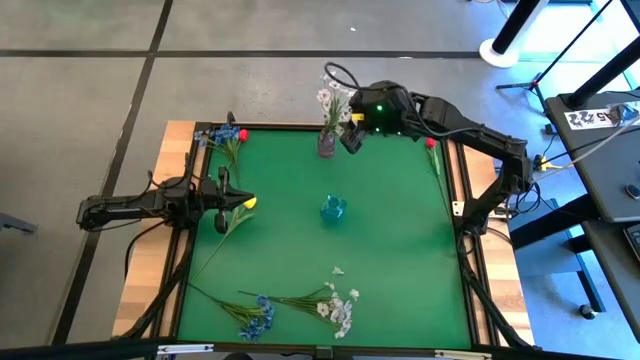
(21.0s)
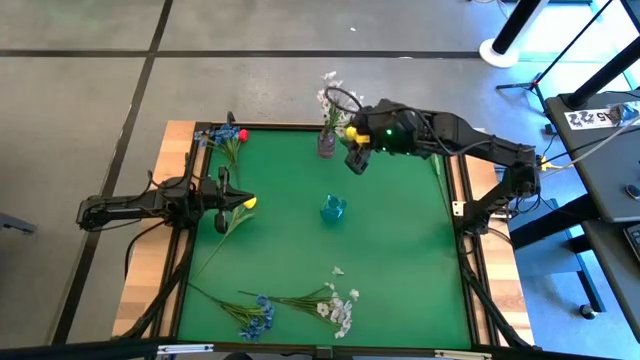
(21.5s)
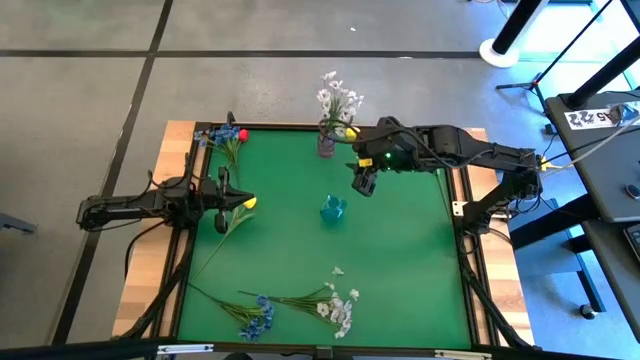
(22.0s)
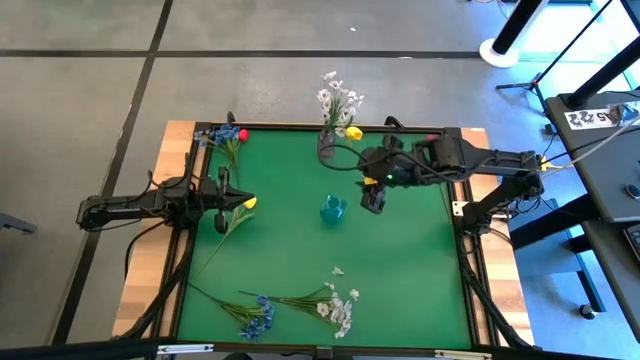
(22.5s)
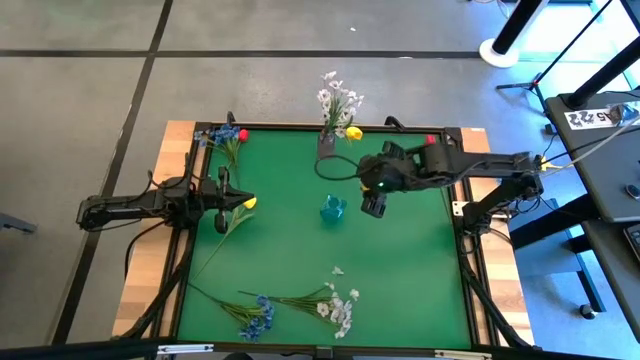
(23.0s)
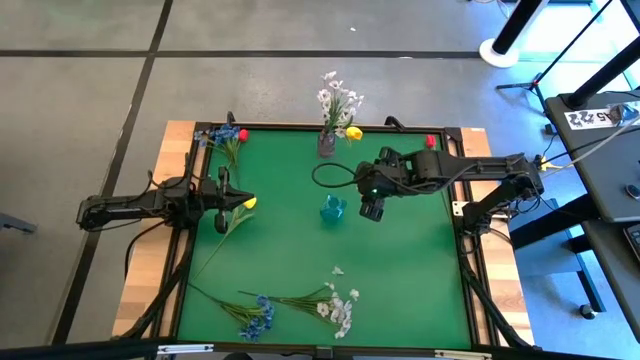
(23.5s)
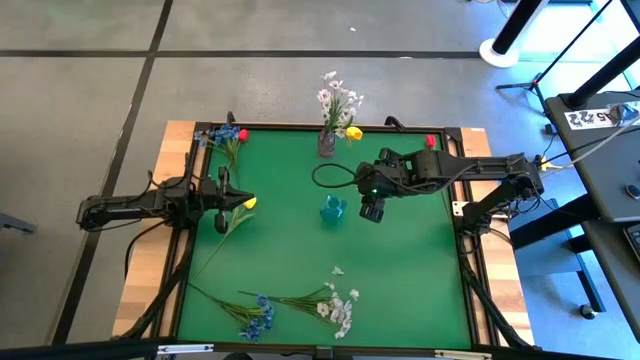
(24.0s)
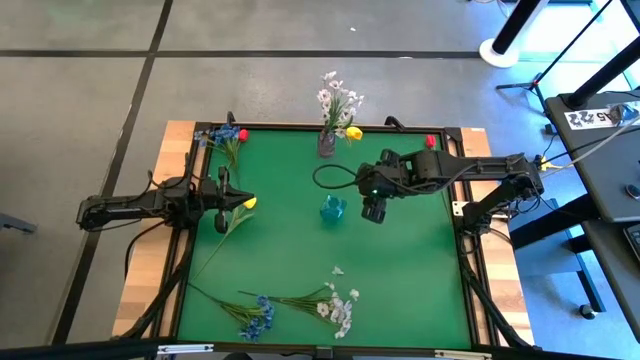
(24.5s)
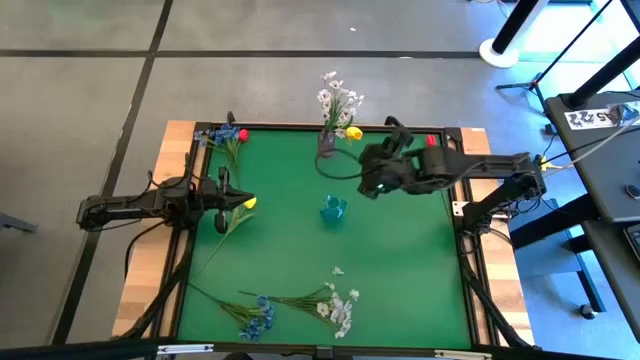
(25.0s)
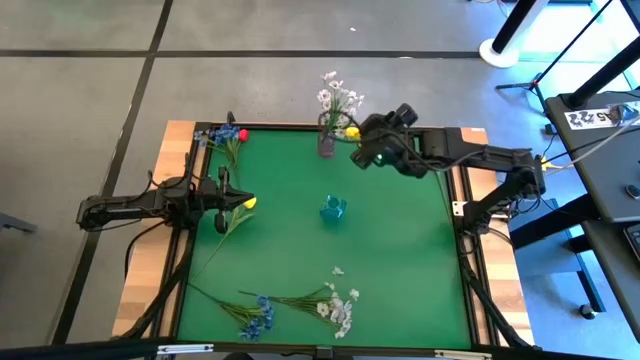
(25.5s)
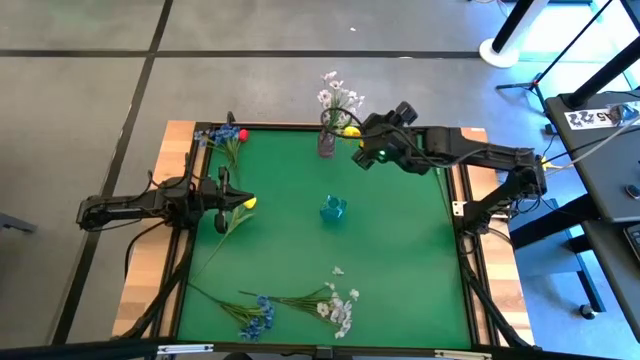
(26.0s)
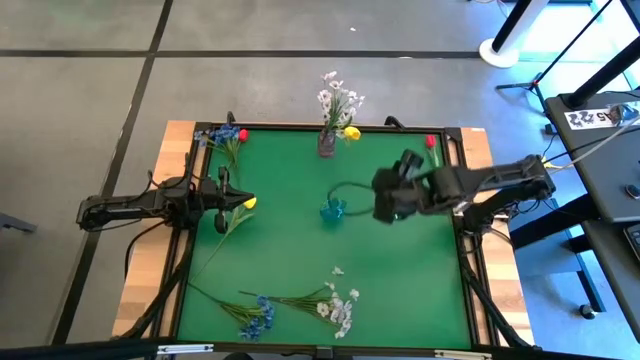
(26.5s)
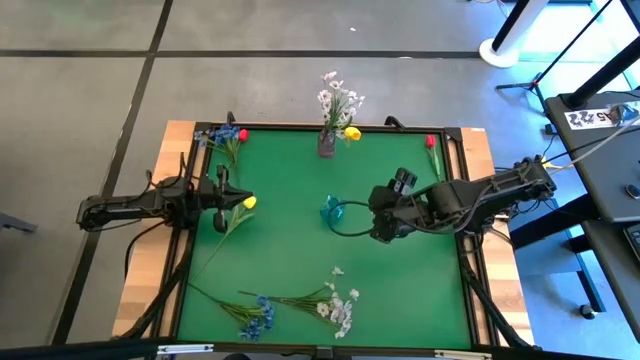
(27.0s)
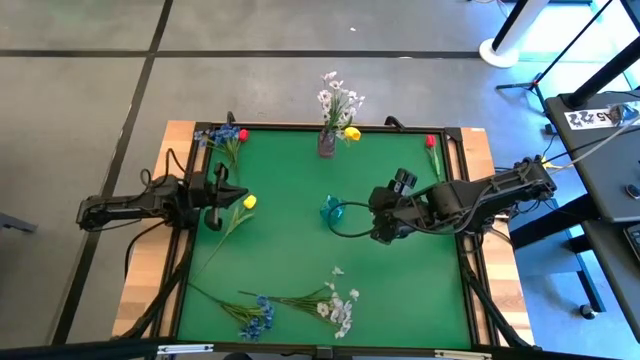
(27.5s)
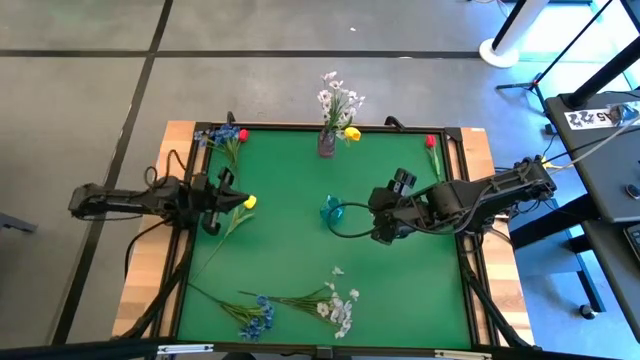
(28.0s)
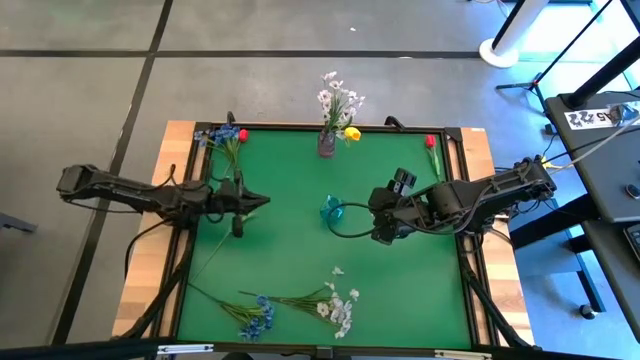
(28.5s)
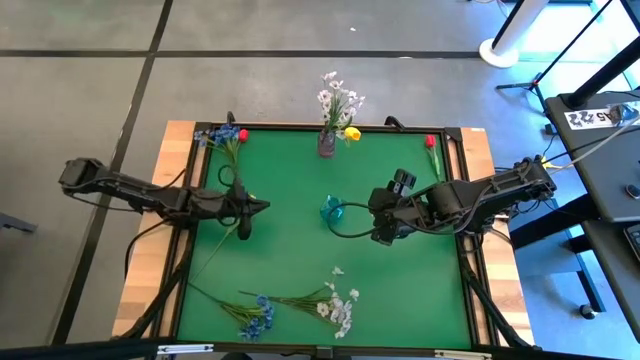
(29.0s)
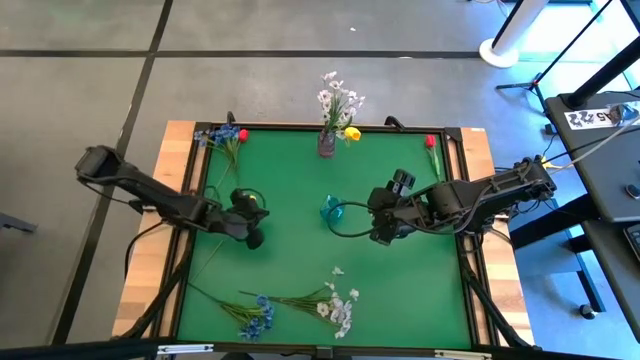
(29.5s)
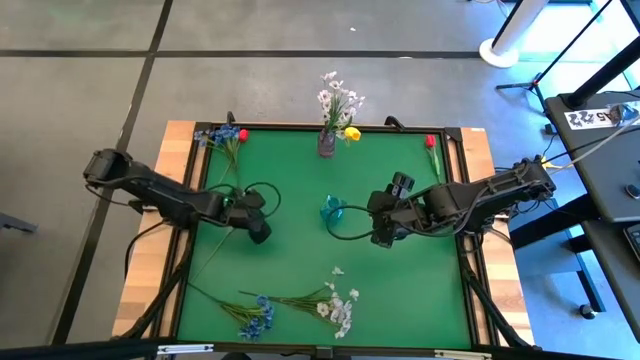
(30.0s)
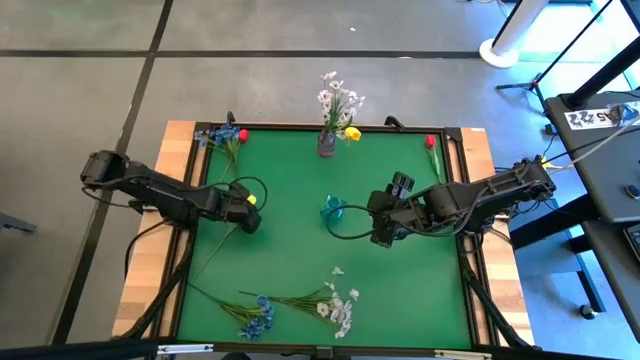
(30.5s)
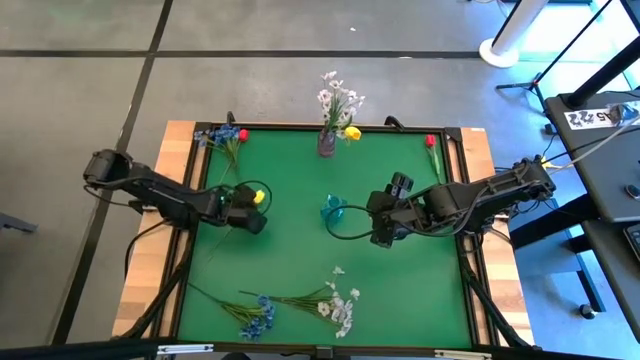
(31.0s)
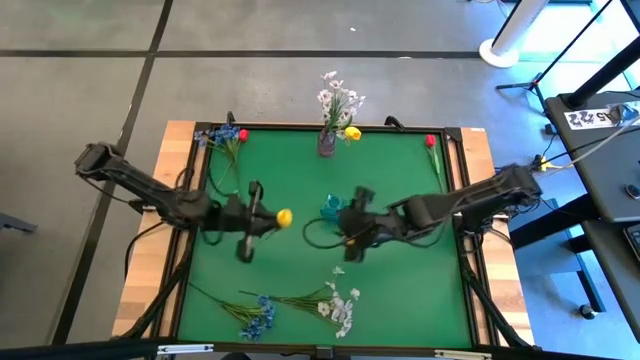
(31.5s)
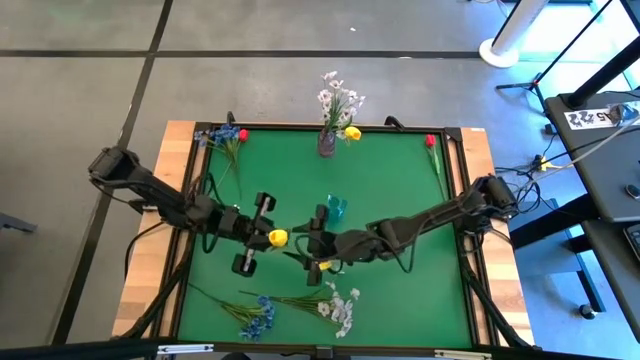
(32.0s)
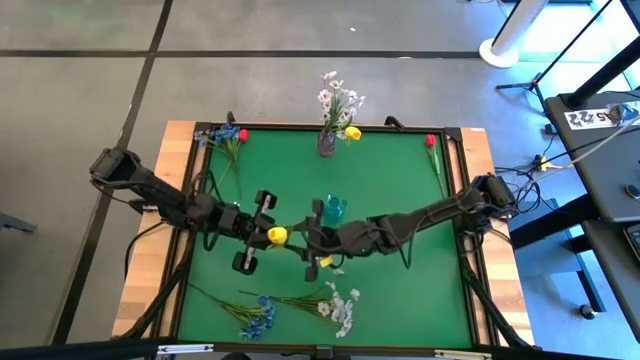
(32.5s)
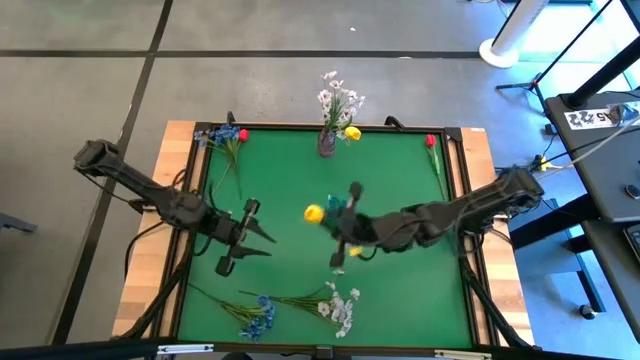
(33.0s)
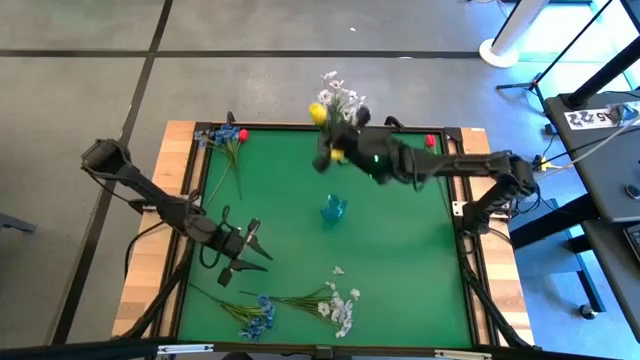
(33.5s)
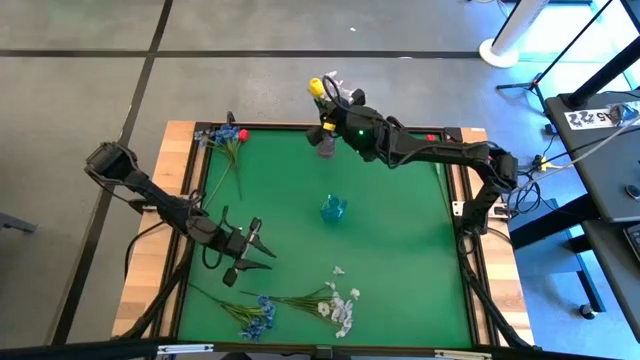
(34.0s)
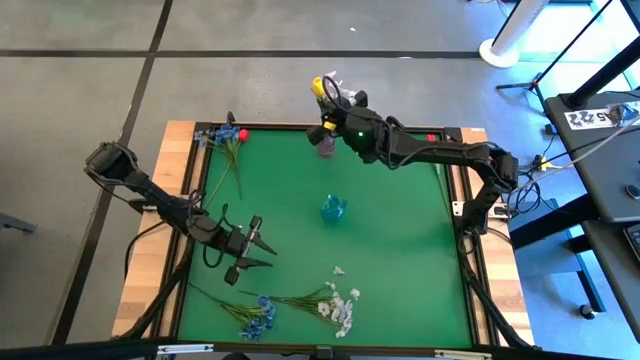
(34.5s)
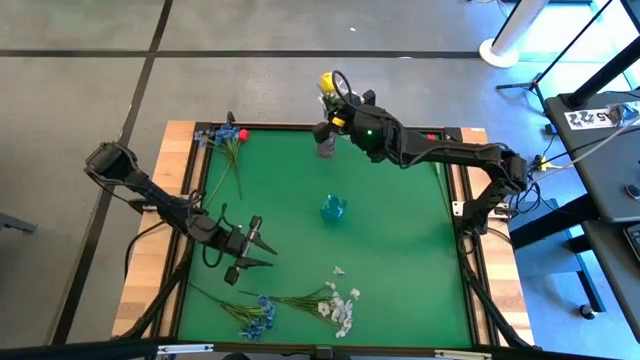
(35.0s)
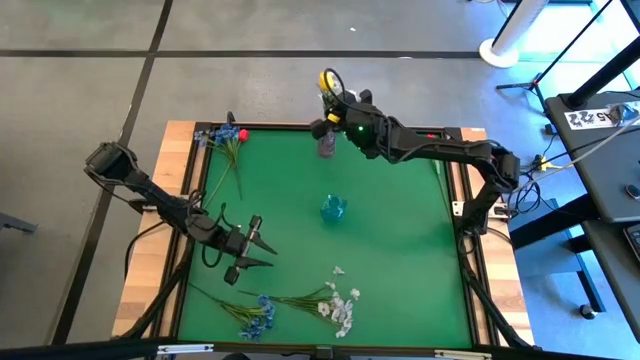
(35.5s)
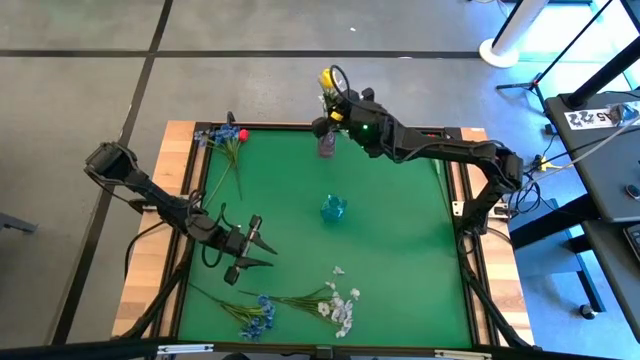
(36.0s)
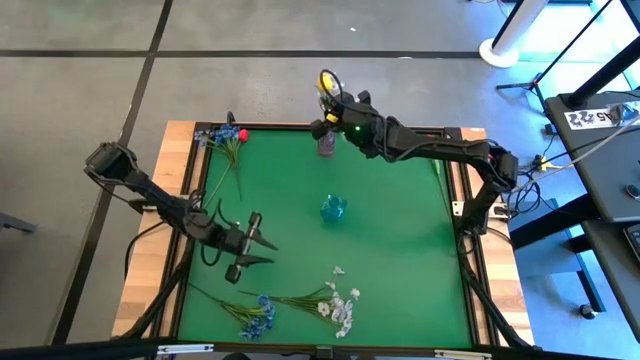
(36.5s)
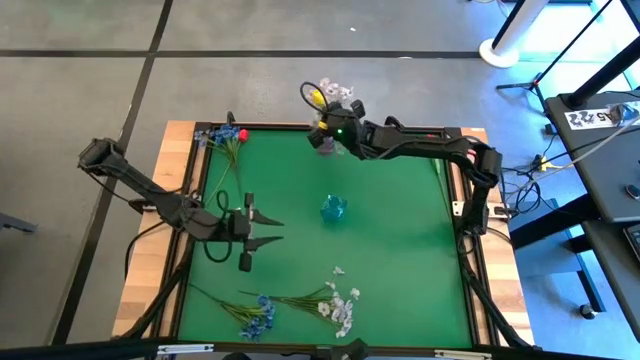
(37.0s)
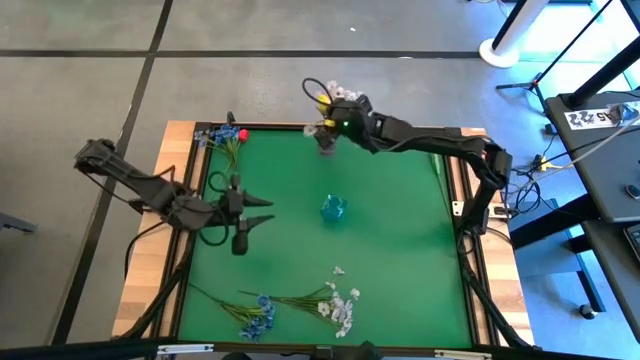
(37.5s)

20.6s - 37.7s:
Task: Sort flowers into vase by color
Put the yellow tulip into the violet vase

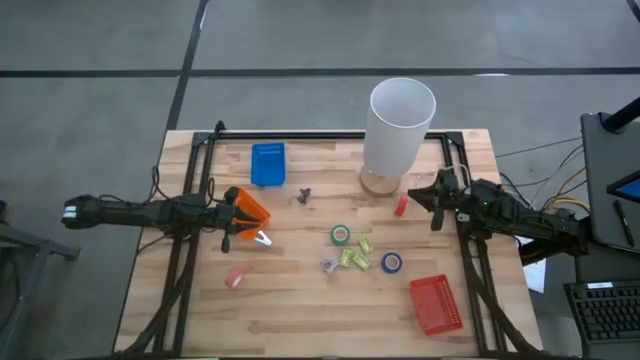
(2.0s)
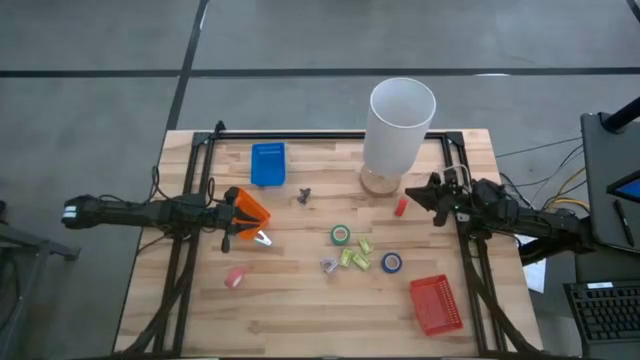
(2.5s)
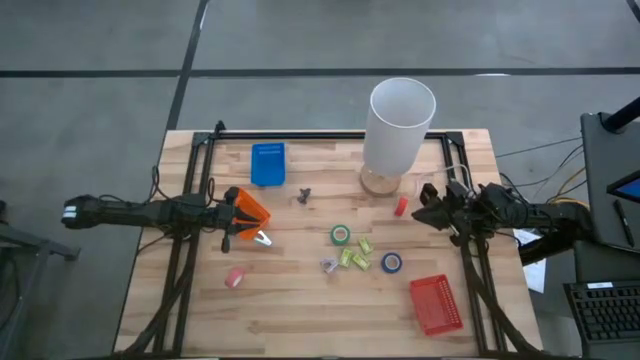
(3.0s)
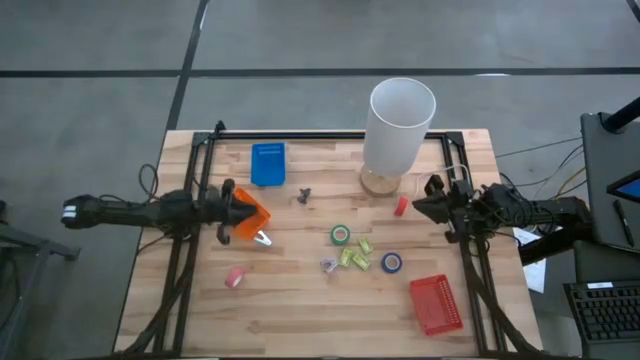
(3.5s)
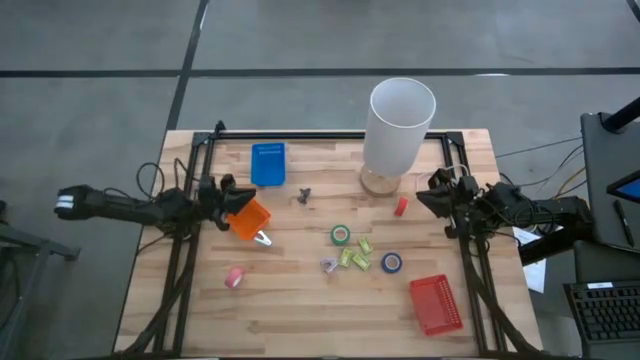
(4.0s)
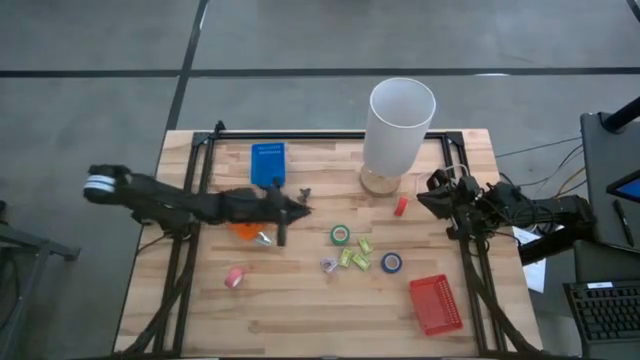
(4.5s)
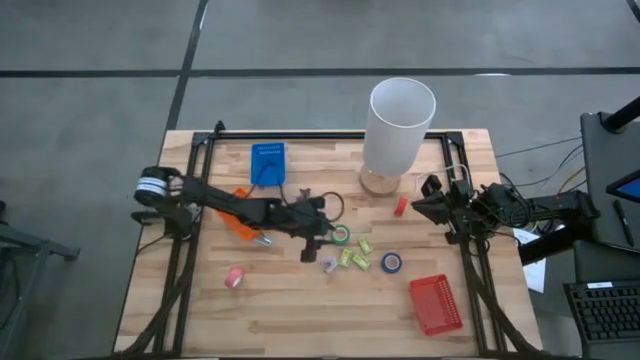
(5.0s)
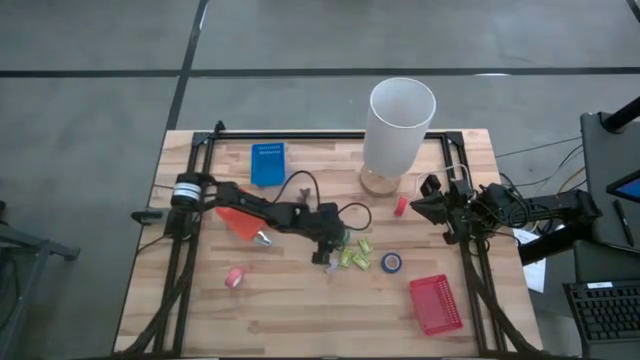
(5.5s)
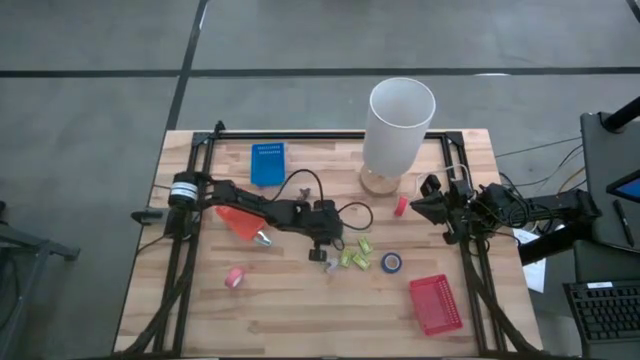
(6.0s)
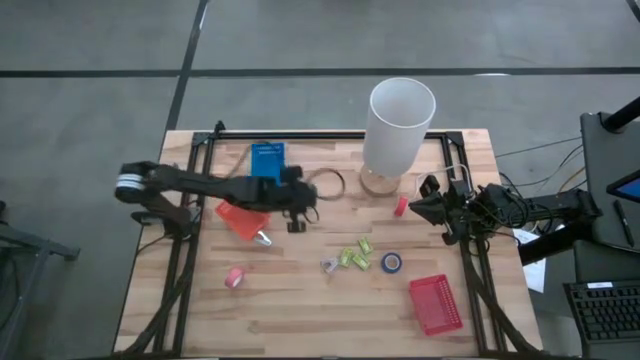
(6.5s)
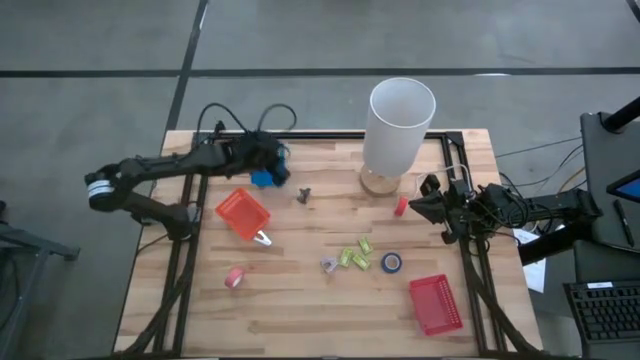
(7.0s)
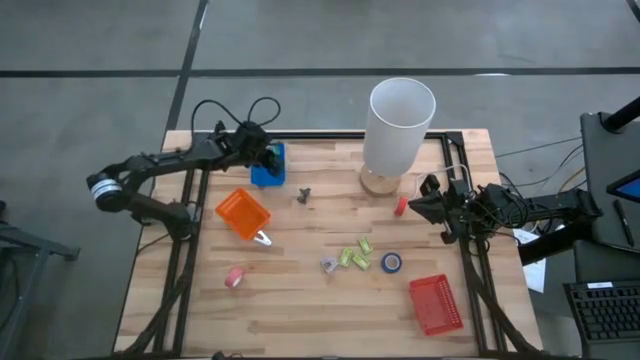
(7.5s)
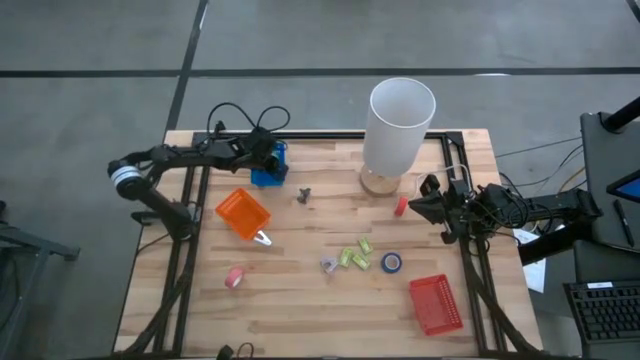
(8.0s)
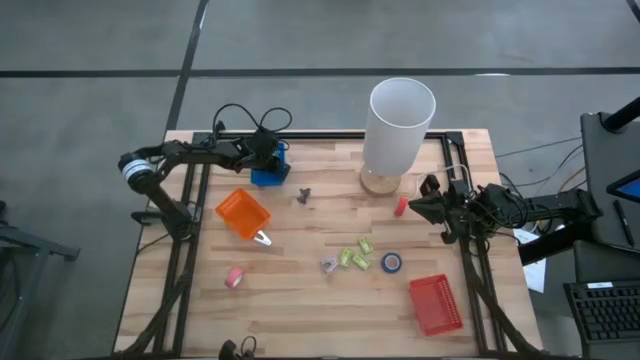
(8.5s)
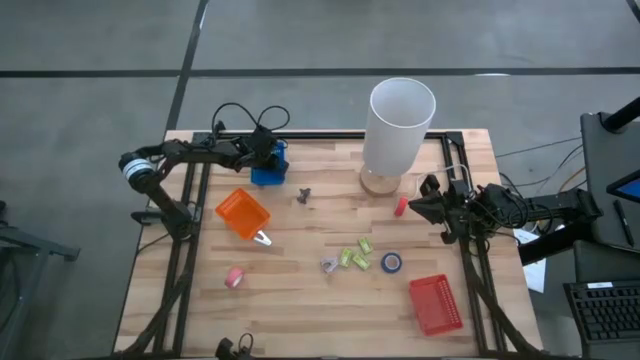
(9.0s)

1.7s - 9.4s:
Task: Pick and place Stapler, Stapler remover, tape
Put the green tape in the blue bin
